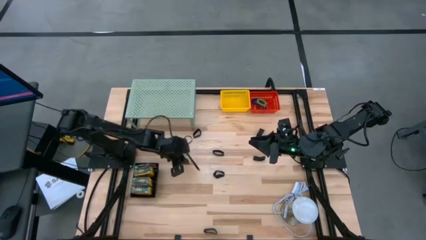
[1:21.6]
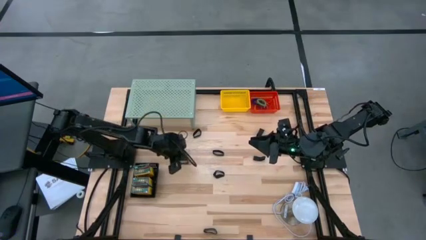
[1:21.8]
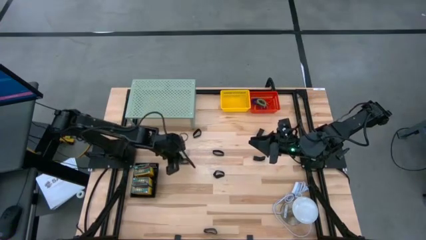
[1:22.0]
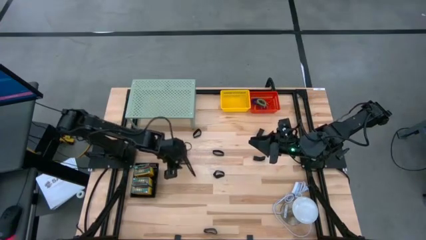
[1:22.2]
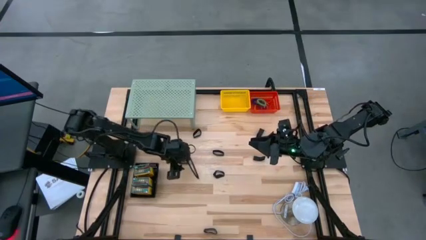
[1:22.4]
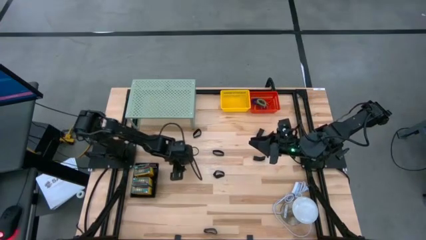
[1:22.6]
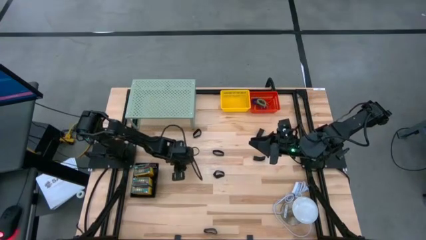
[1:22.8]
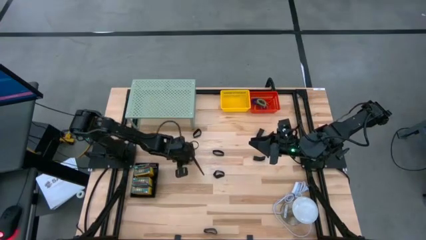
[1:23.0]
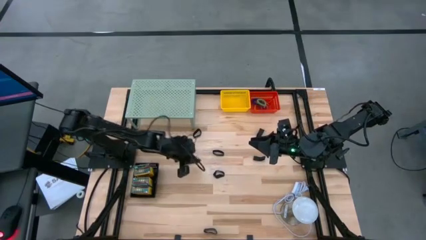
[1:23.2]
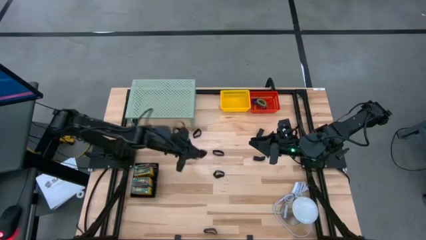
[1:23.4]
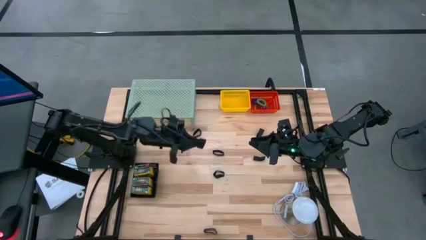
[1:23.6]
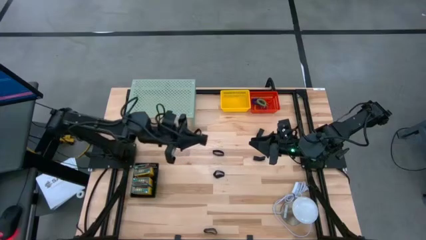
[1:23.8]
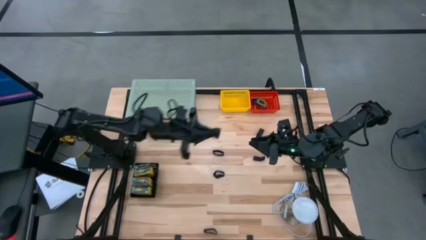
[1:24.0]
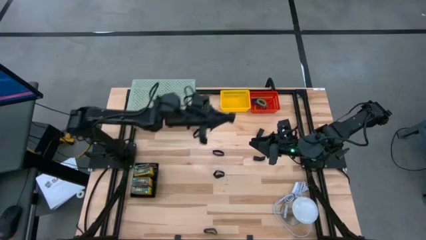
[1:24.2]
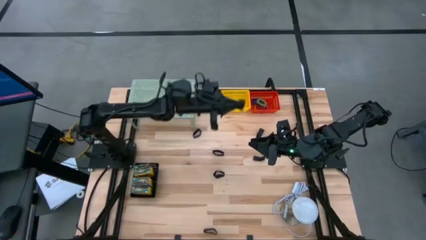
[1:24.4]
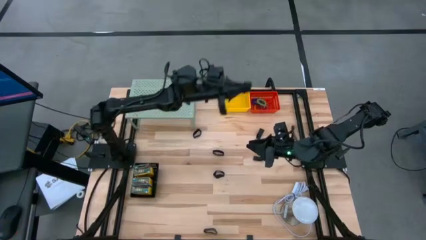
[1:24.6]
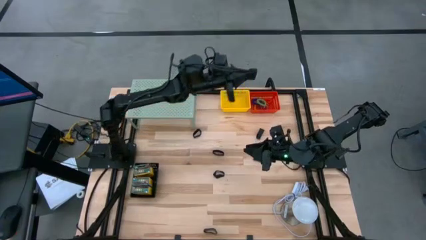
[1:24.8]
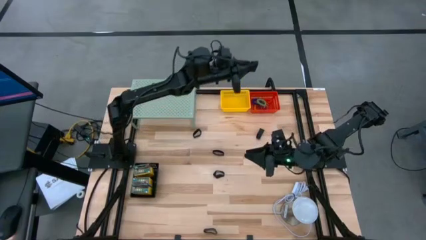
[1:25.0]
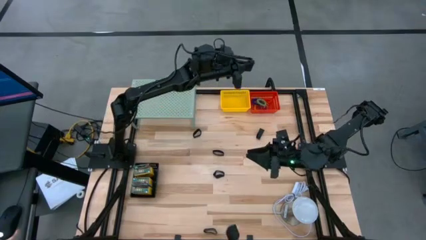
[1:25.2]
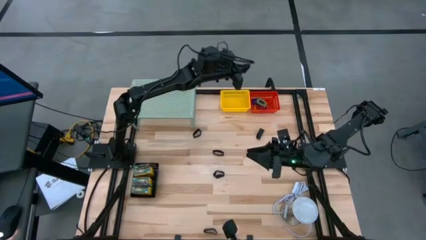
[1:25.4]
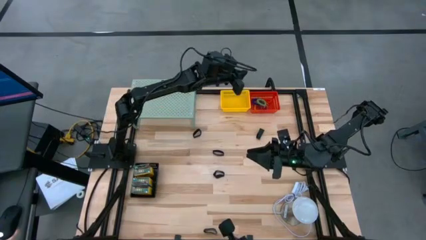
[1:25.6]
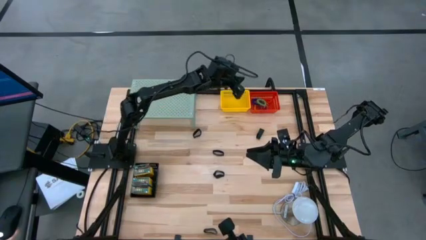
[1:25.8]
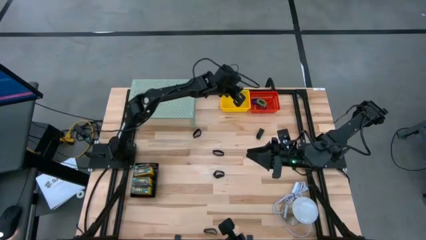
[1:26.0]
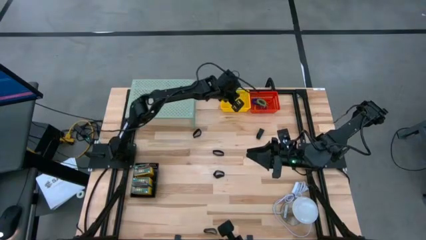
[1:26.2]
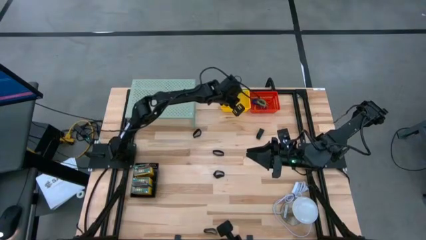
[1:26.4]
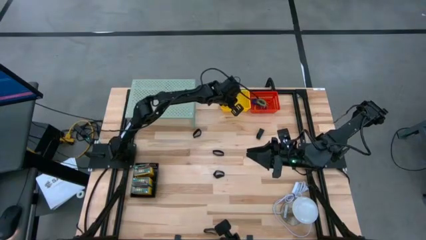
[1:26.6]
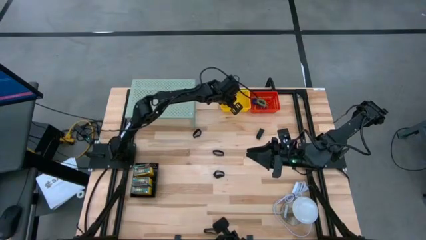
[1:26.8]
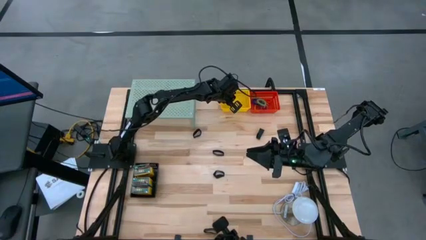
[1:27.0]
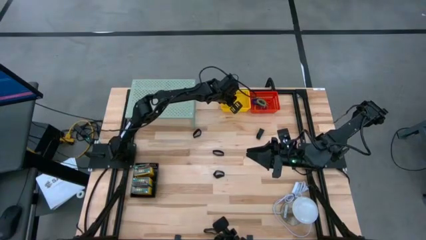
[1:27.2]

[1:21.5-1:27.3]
Task: Pick & Place Office Desk Supplies
Put the black rubber band into the yellow basket

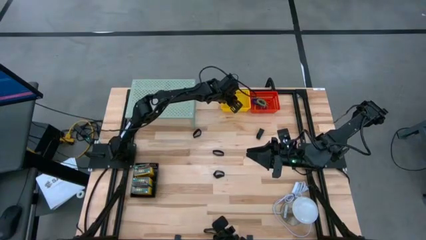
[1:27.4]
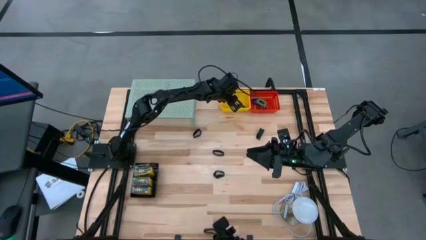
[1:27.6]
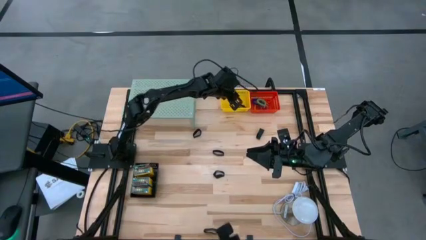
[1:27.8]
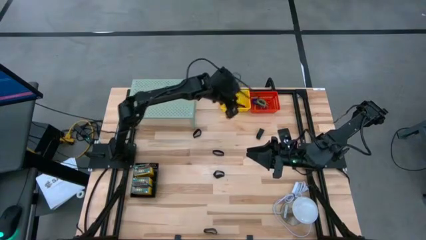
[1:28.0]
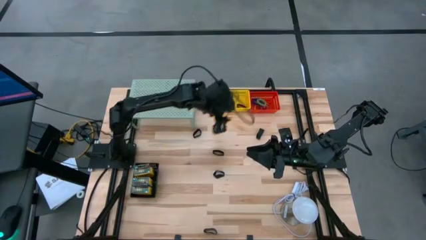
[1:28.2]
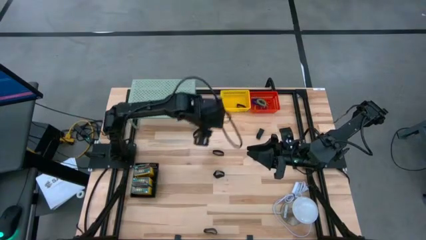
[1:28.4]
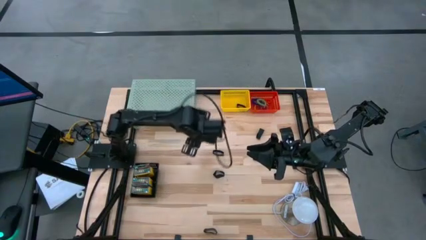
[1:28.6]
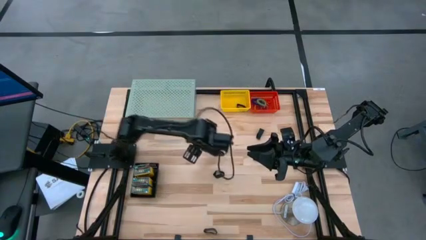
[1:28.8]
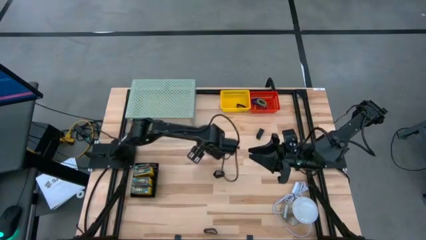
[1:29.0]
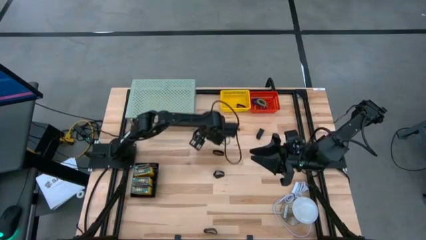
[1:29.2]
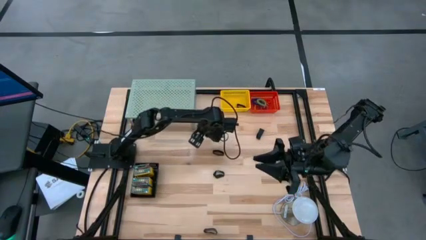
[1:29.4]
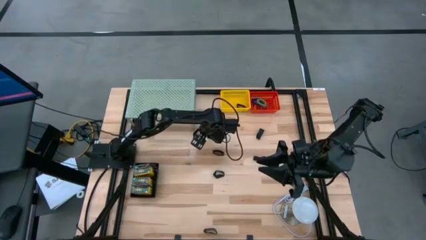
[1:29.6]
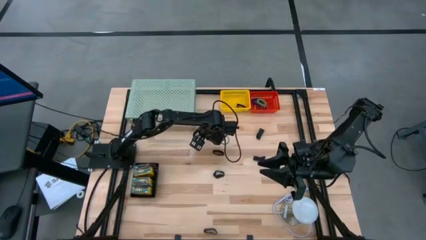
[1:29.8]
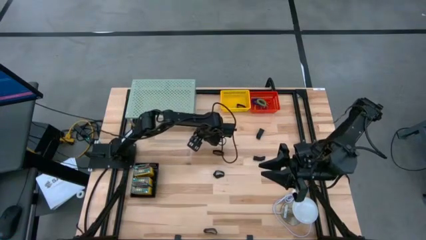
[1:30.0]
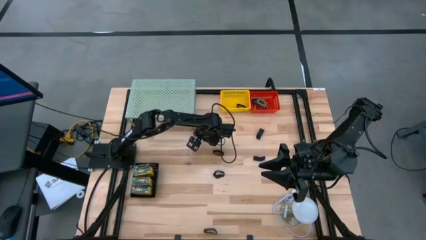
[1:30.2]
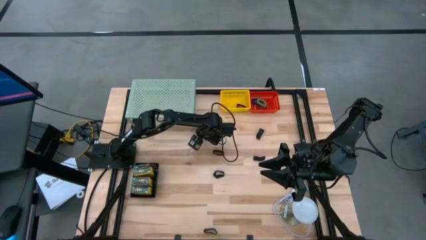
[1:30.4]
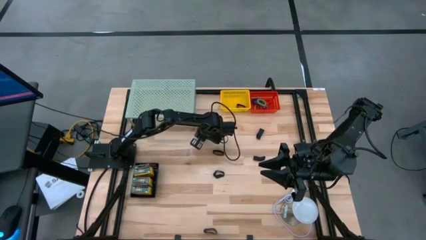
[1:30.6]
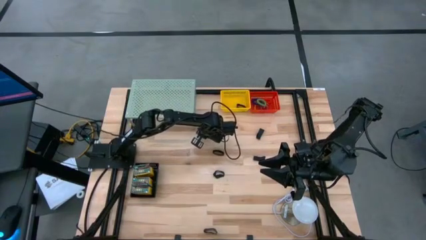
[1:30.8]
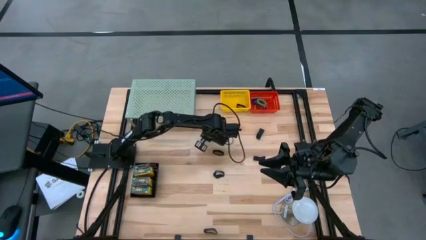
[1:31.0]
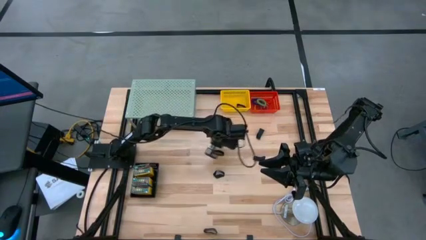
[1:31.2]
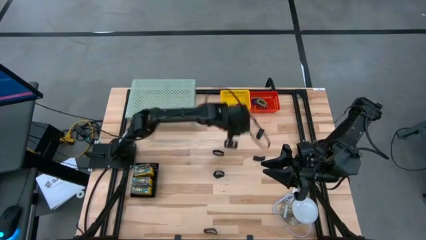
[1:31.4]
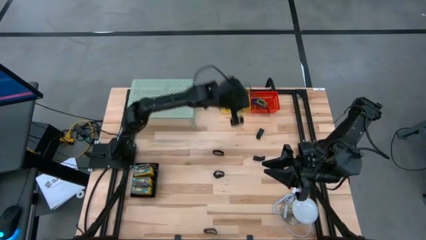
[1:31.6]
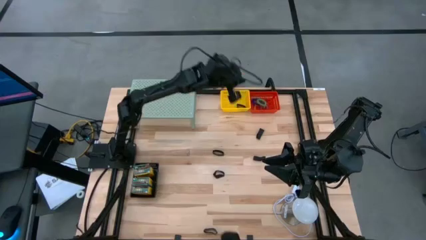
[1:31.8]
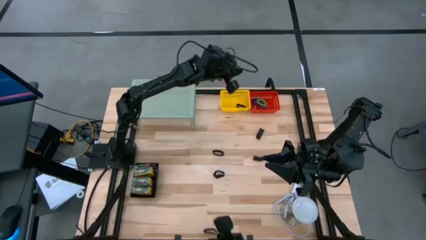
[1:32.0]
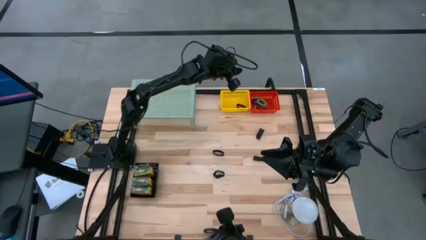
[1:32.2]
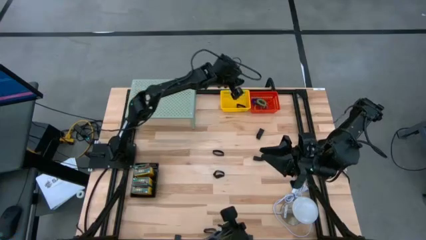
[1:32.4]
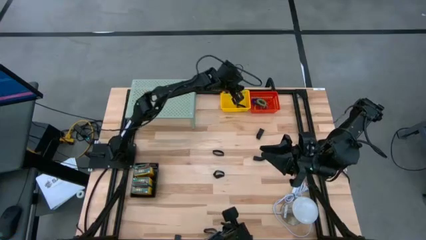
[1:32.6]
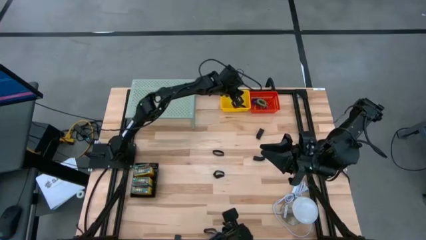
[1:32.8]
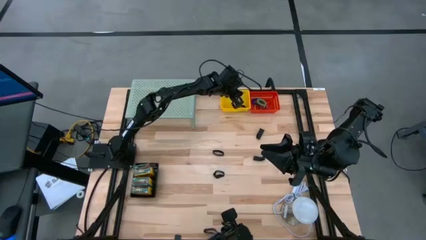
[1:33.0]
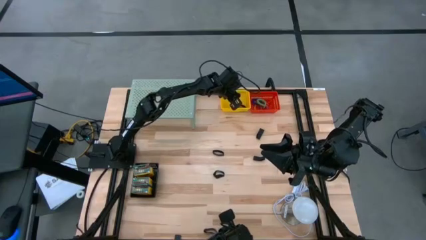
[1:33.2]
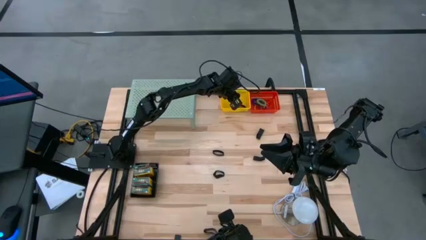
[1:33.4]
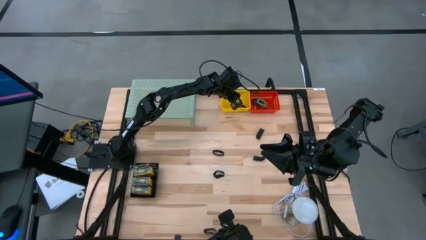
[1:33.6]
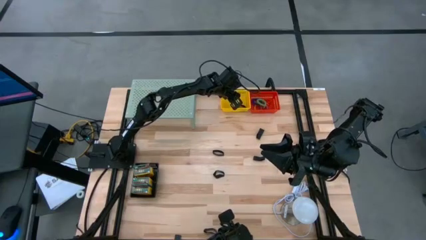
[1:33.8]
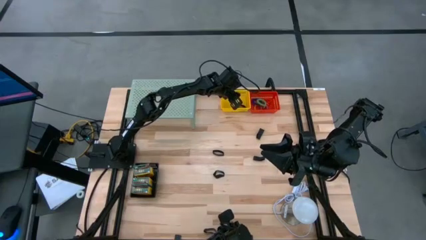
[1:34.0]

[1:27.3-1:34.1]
Put the black rubber band into the yellow basket

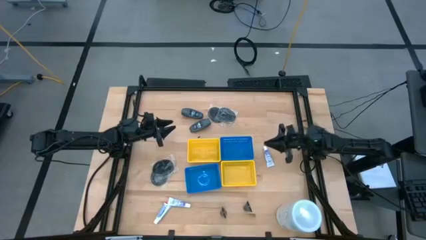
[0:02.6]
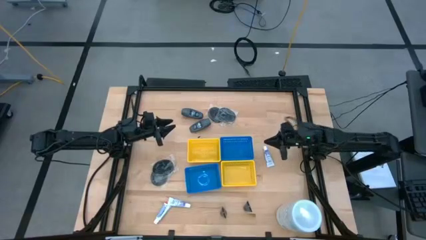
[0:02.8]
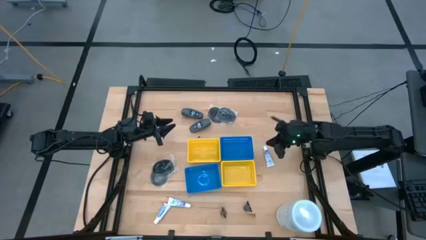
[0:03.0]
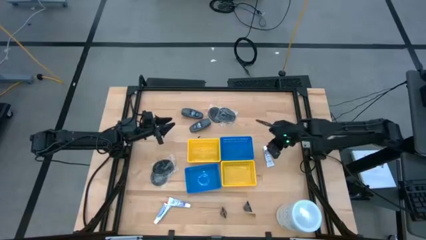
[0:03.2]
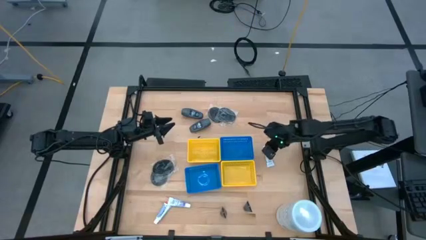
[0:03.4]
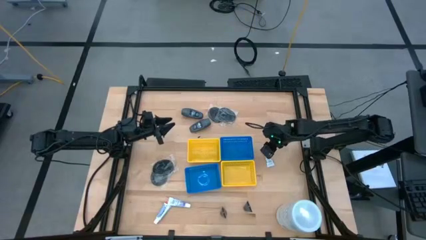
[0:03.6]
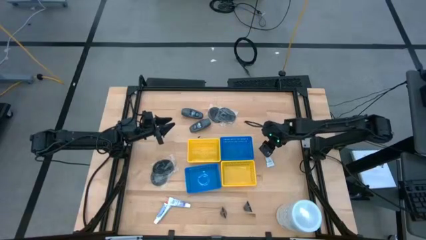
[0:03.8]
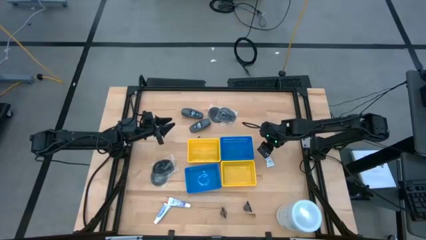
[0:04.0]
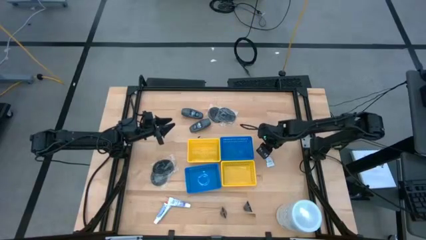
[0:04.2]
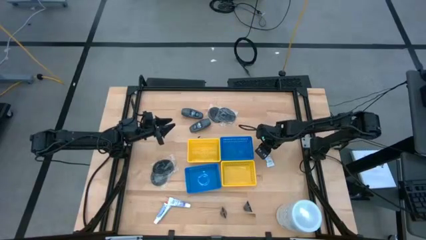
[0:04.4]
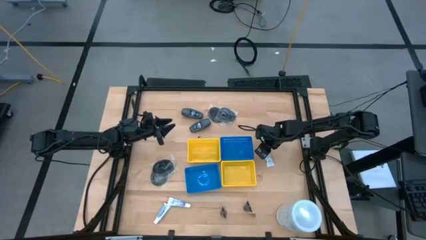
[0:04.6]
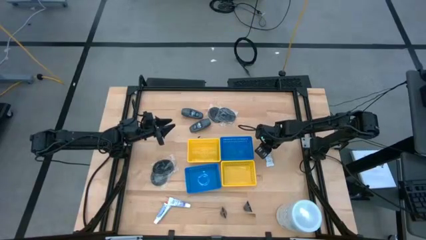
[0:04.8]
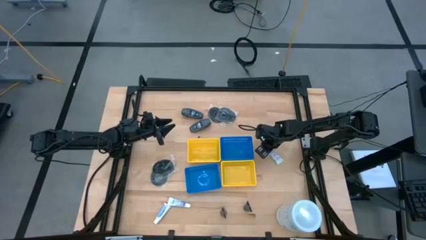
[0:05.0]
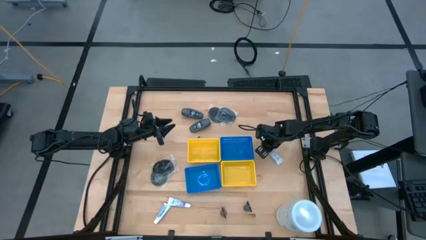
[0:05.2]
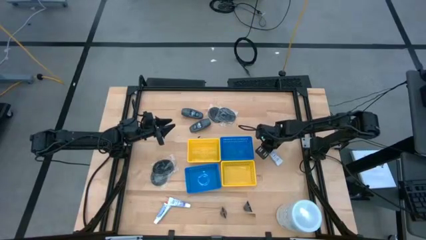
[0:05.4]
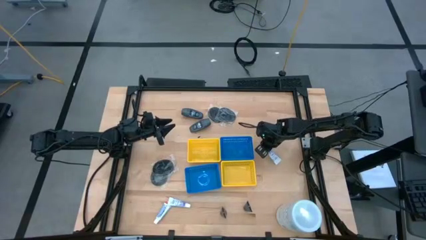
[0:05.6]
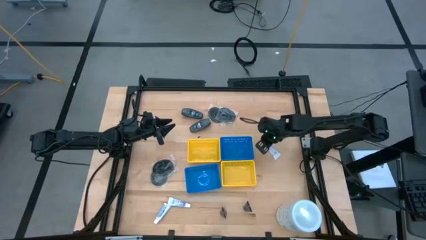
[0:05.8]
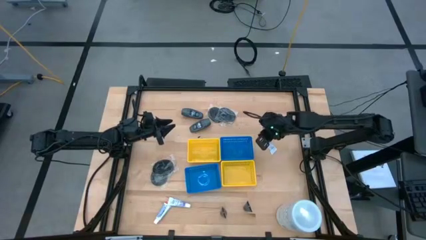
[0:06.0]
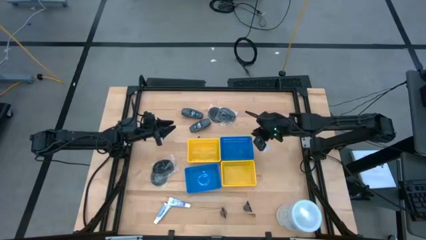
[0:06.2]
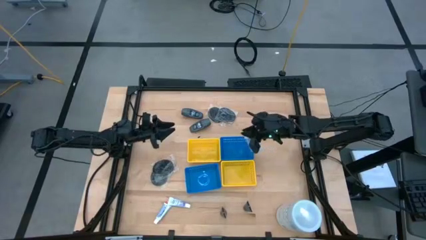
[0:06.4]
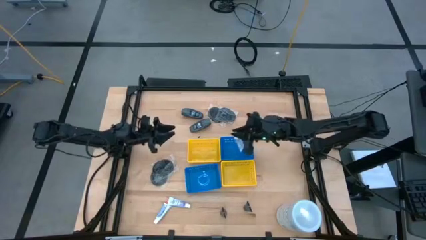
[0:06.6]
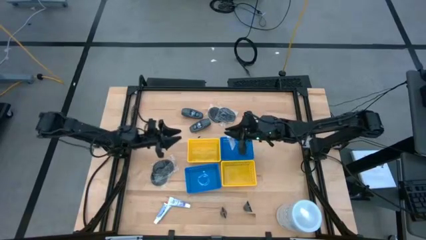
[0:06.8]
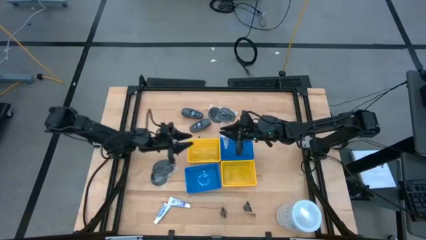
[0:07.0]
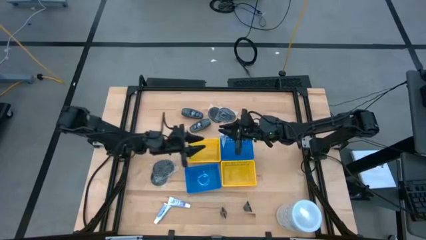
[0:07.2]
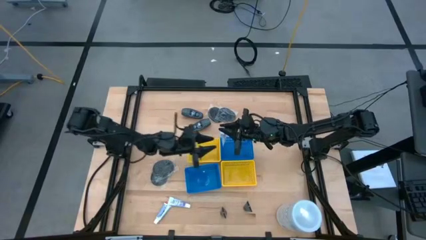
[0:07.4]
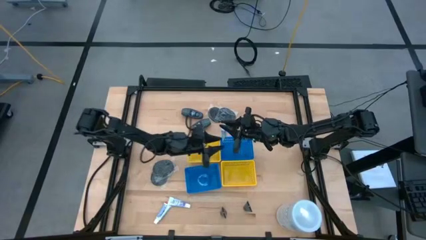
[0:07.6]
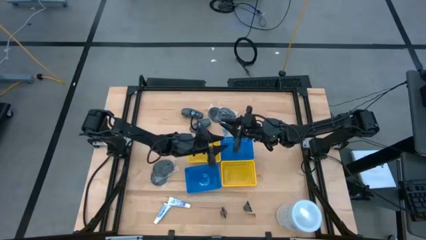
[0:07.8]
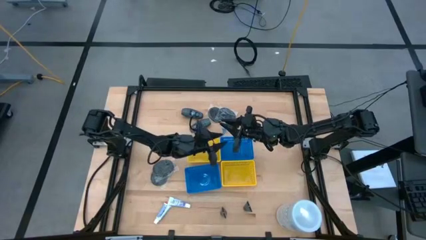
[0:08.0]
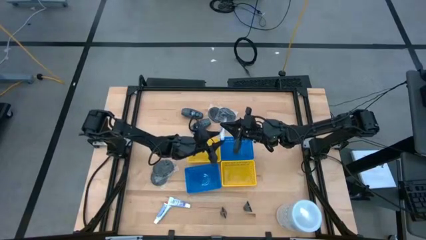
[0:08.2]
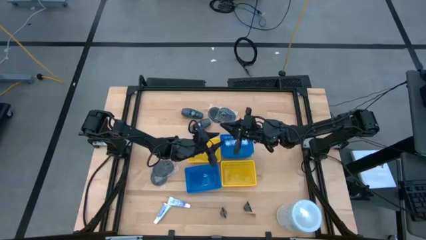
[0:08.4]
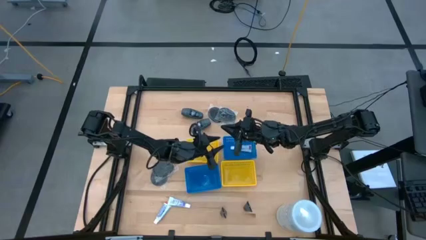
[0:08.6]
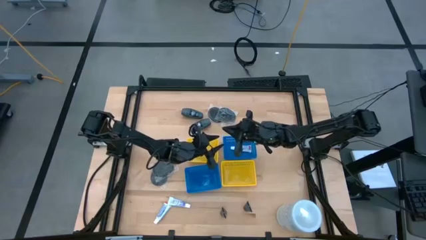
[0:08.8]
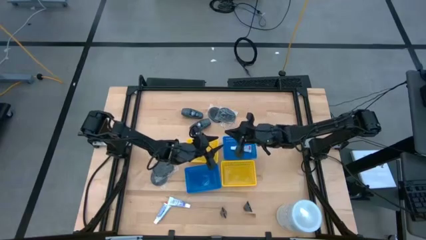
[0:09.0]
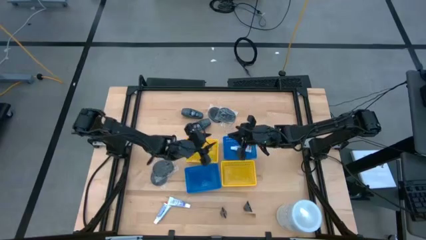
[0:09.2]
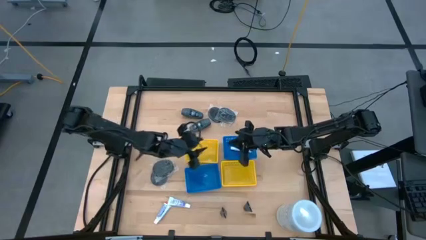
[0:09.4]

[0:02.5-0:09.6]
Task: Pick & Place Travel size toiletries
Put the right toothpaste into the top right blue bin
